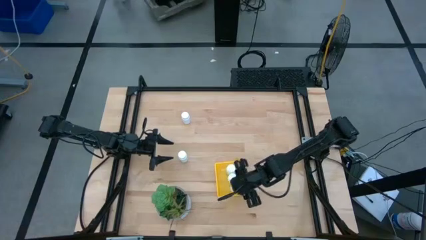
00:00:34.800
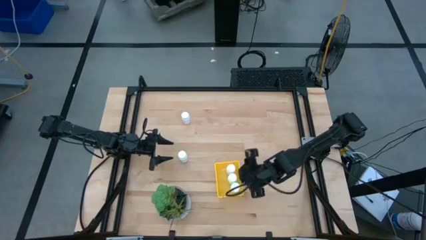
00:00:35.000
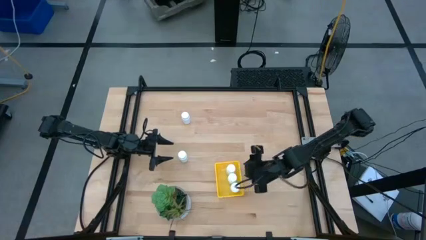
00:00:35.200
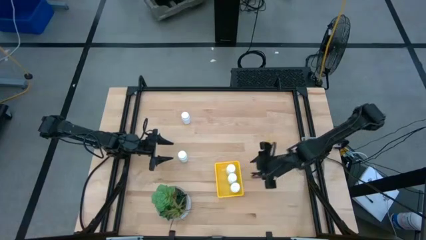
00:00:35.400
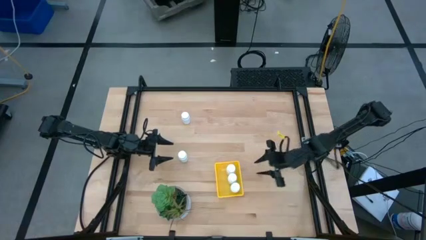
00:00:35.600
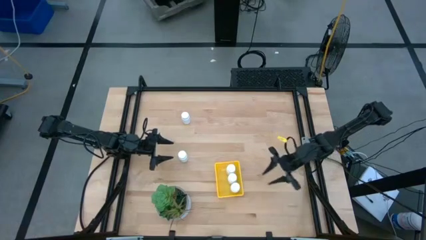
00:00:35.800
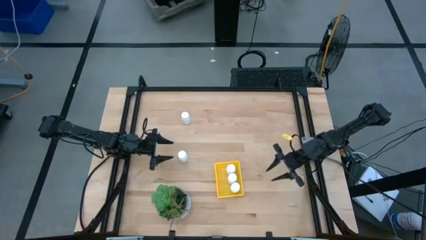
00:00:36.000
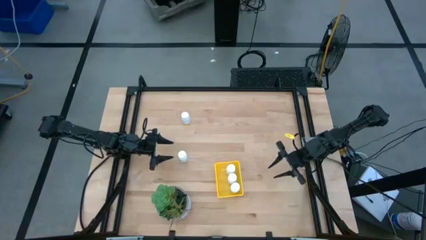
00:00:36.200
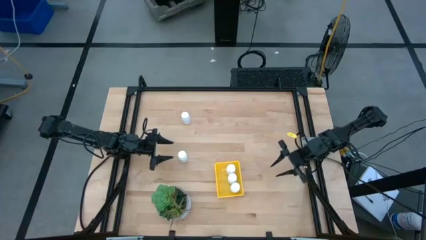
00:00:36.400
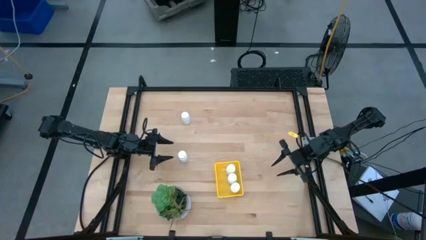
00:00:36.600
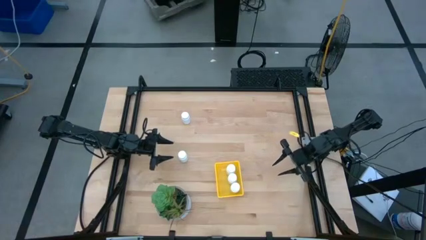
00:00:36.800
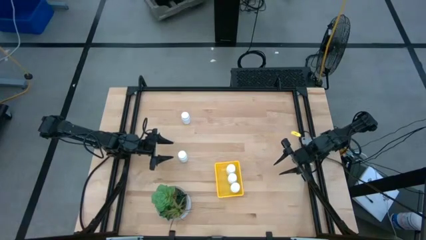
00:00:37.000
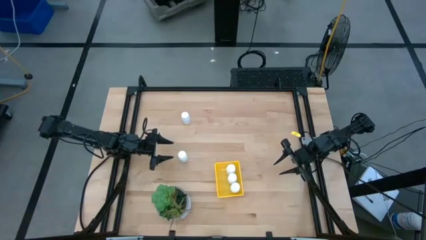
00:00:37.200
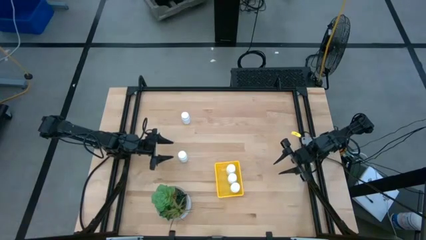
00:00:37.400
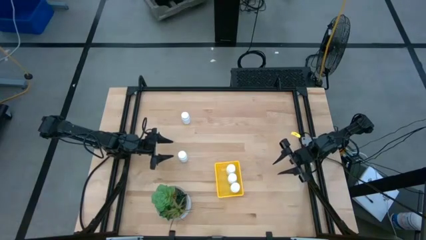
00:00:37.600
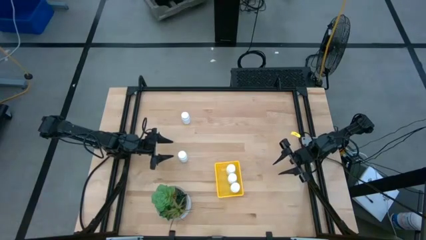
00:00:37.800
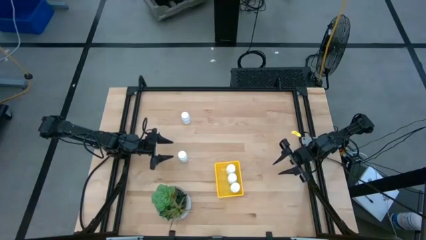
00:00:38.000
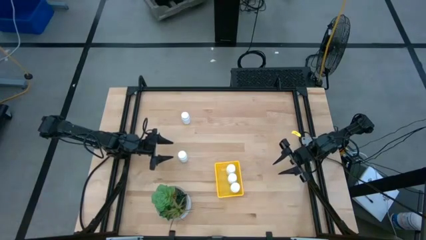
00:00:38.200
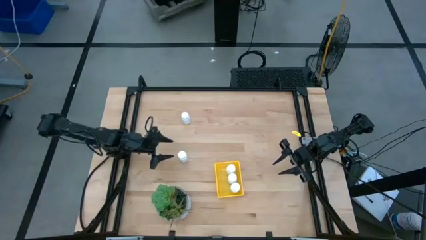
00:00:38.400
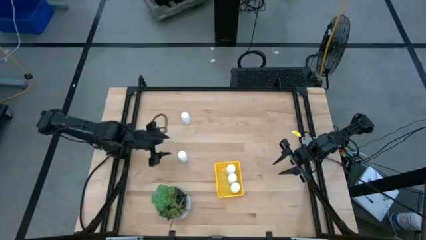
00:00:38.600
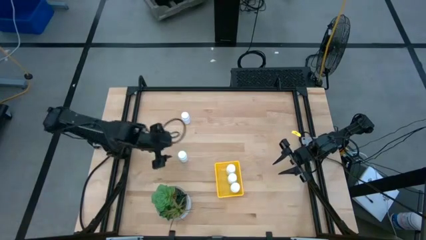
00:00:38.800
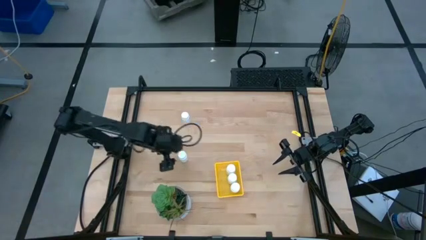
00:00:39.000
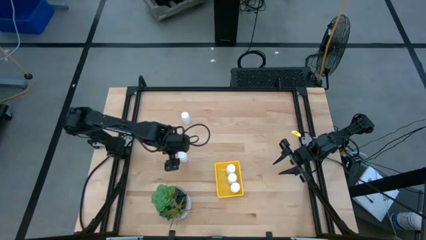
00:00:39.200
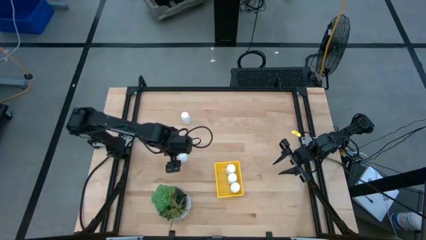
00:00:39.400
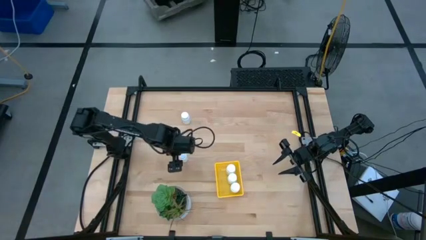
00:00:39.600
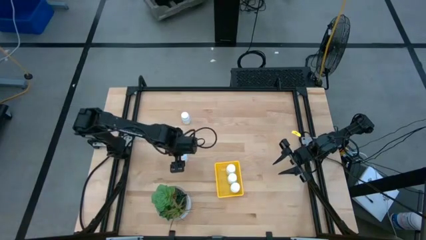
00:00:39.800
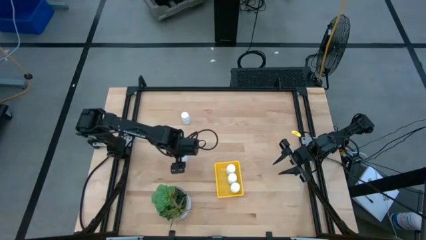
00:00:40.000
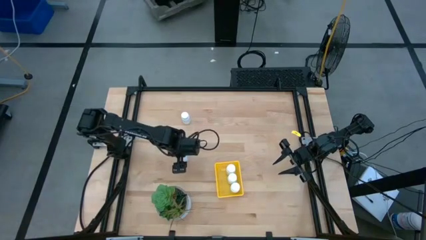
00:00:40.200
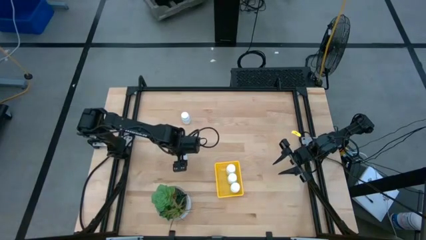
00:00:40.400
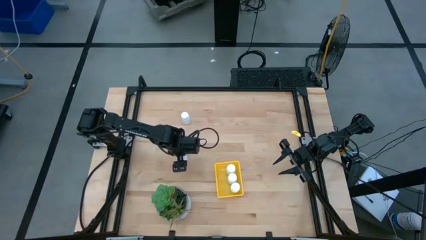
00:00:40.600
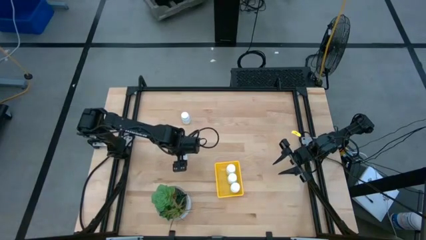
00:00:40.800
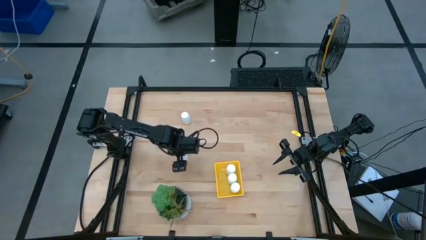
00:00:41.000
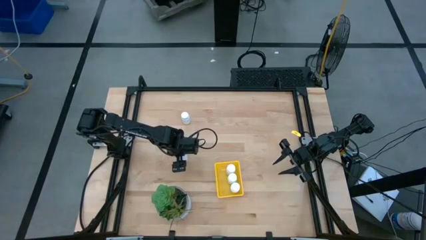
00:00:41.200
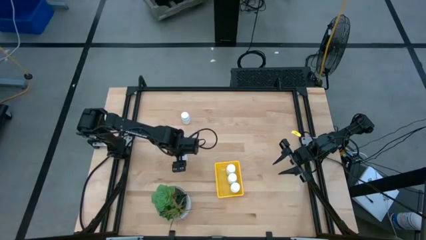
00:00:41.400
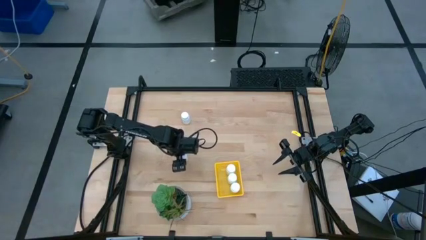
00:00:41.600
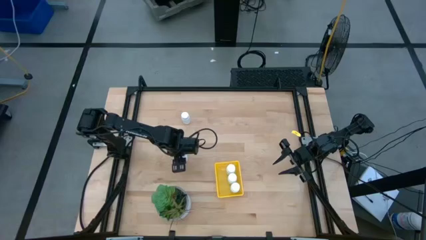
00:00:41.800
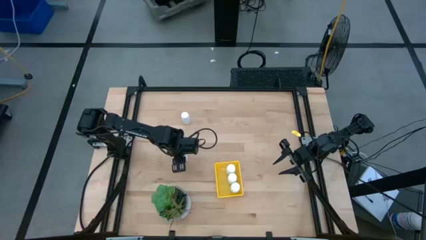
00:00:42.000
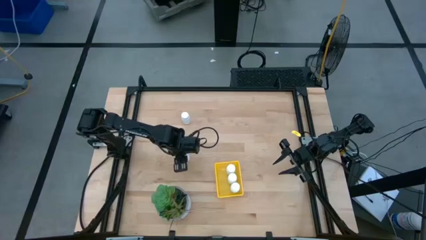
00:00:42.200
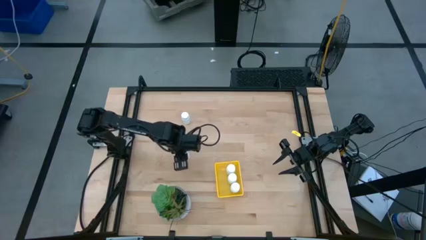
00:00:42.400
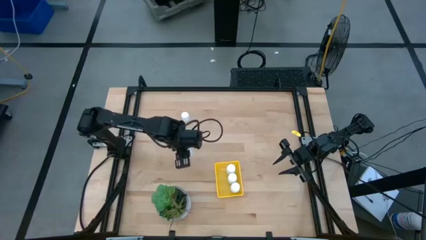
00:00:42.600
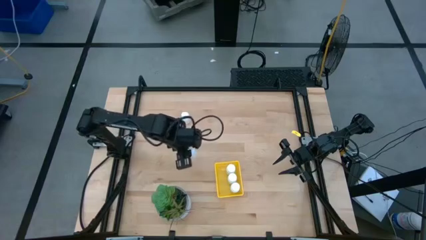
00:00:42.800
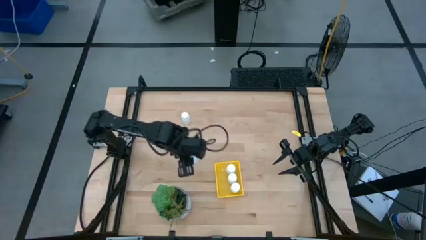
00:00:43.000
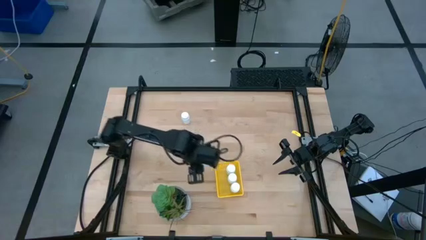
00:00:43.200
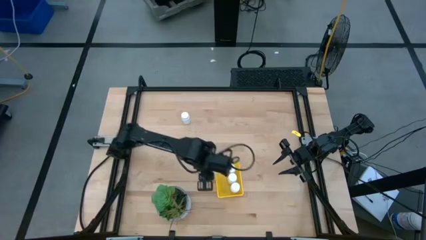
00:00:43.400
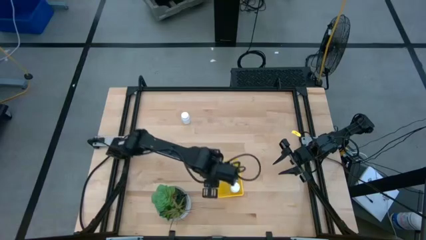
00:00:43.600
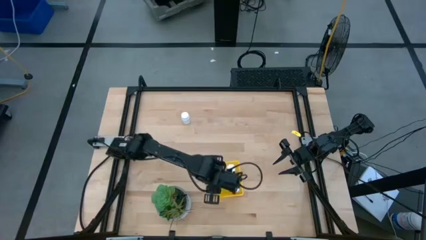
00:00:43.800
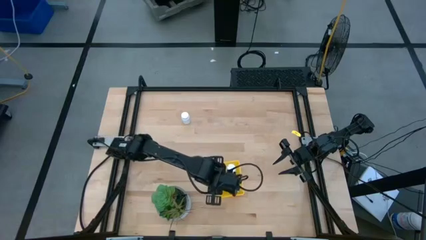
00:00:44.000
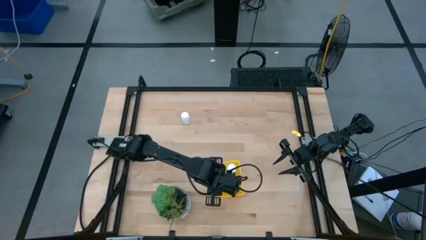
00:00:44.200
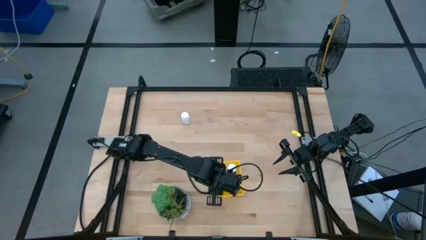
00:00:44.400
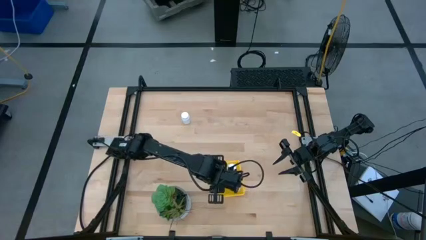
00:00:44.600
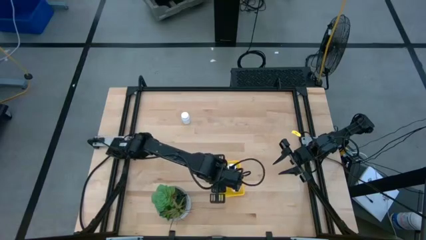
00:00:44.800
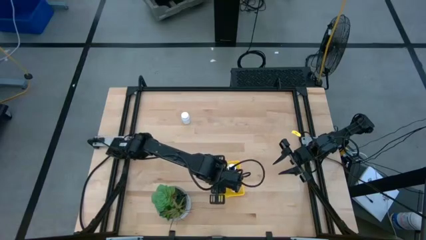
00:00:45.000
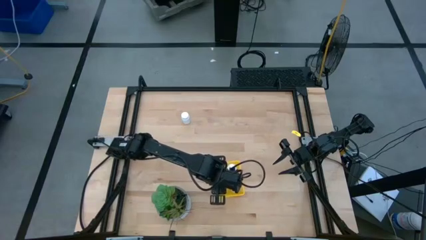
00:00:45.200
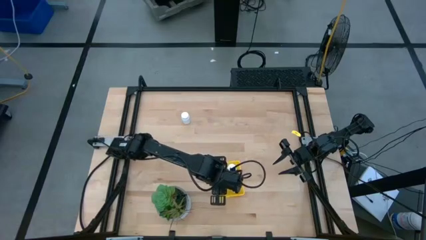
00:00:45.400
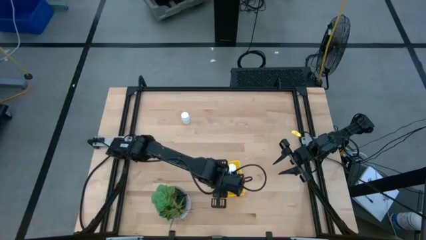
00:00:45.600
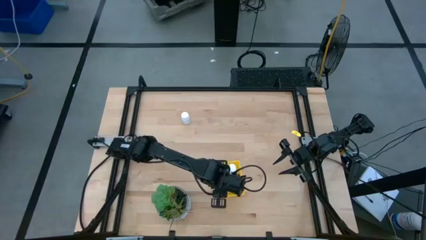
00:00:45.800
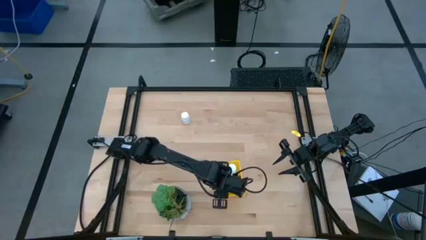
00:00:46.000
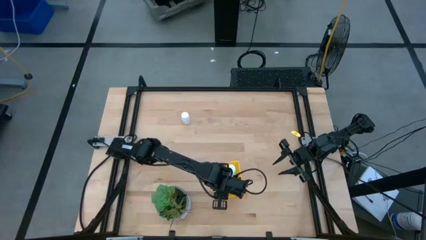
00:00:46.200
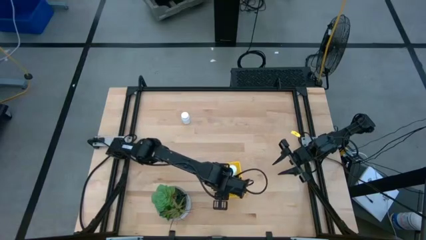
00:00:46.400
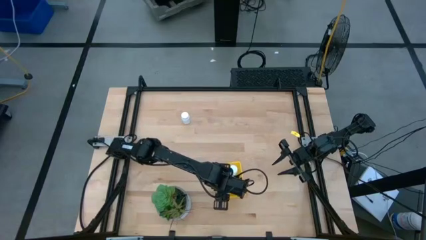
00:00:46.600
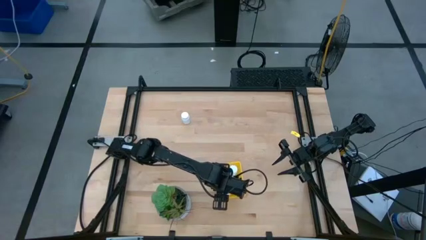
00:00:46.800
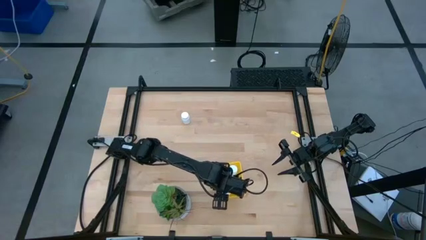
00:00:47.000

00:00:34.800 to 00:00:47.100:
Task: Pick and place pill bottles into a basket
Put the white pill bottle into the yellow bin
